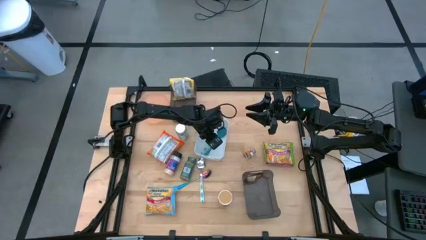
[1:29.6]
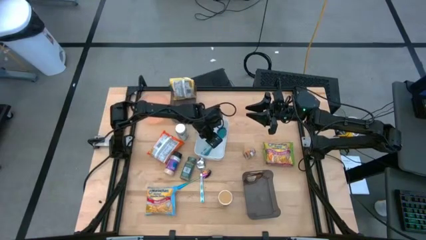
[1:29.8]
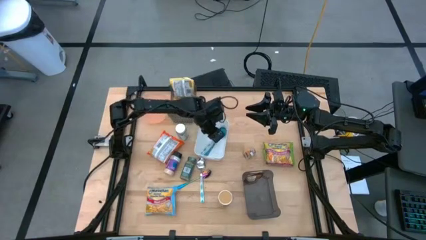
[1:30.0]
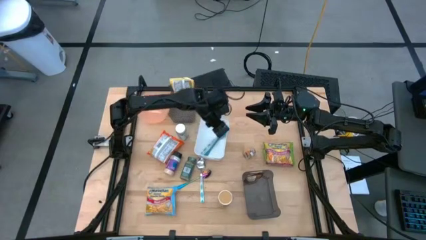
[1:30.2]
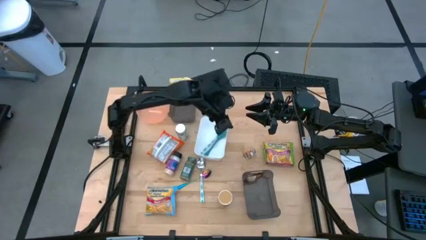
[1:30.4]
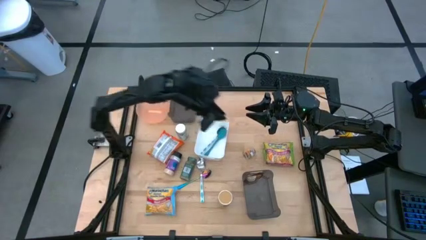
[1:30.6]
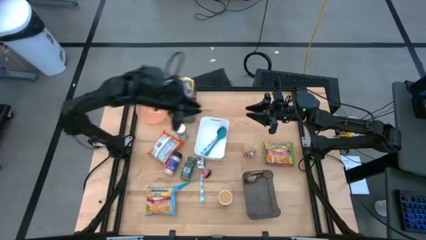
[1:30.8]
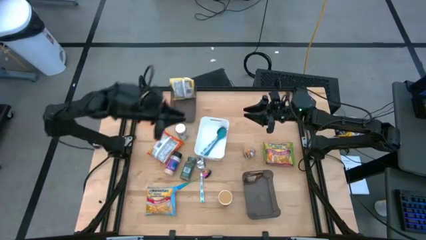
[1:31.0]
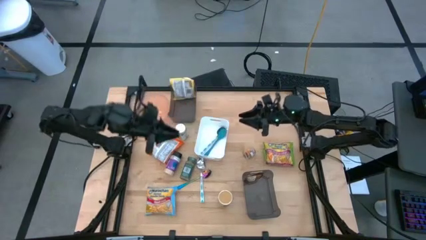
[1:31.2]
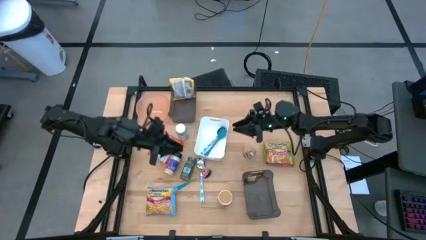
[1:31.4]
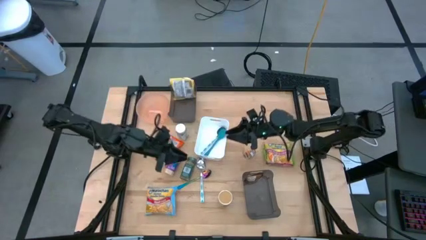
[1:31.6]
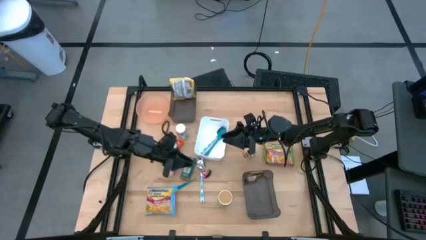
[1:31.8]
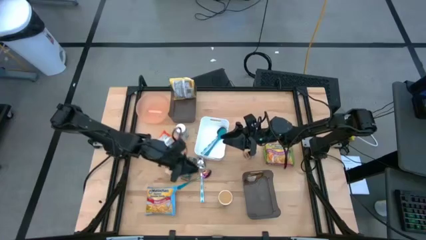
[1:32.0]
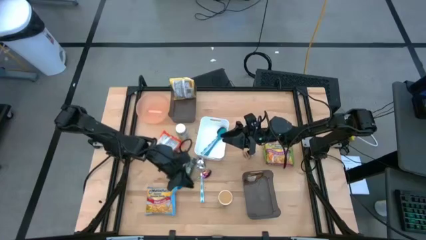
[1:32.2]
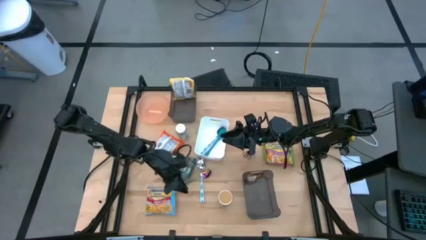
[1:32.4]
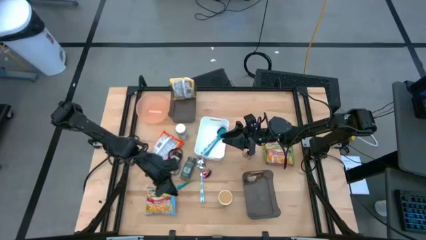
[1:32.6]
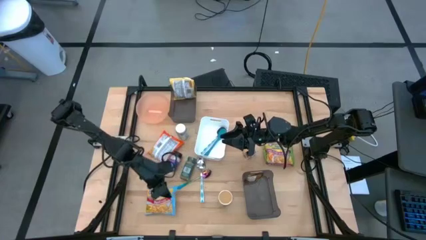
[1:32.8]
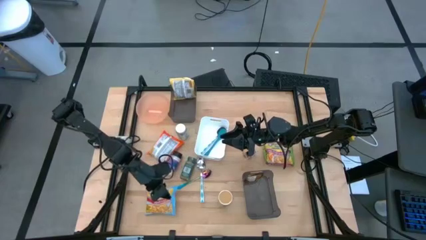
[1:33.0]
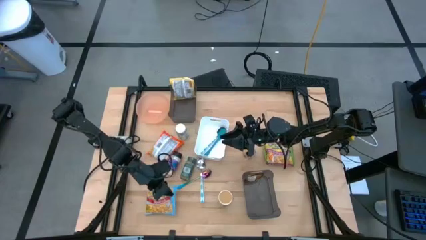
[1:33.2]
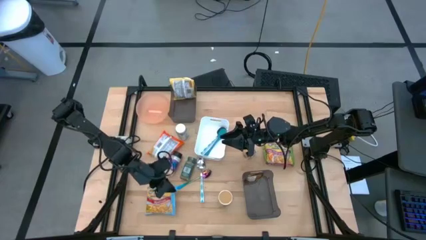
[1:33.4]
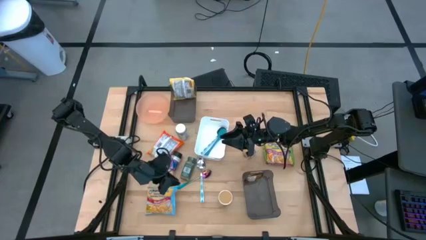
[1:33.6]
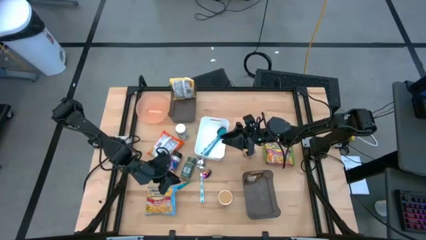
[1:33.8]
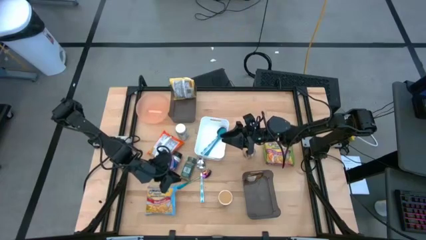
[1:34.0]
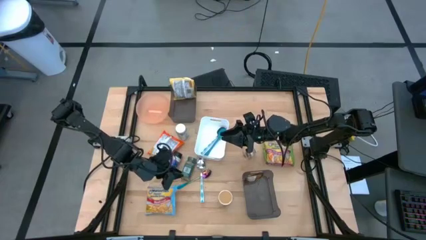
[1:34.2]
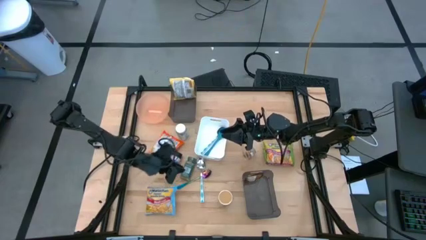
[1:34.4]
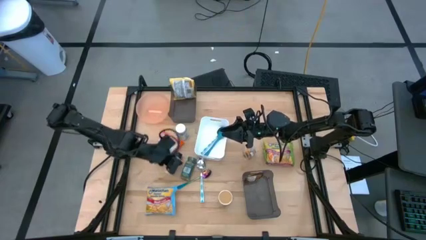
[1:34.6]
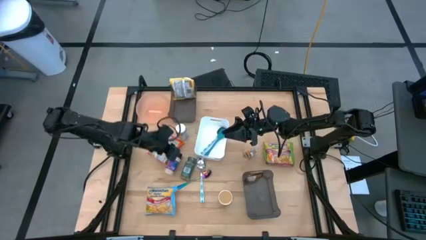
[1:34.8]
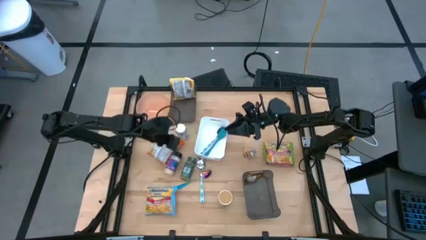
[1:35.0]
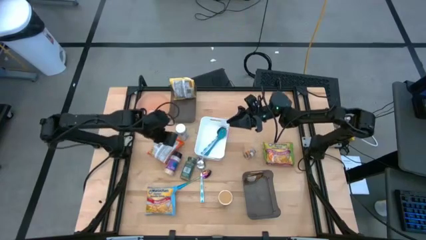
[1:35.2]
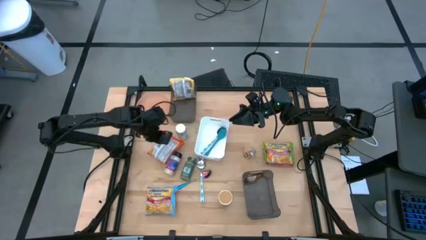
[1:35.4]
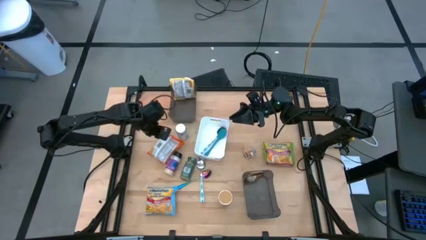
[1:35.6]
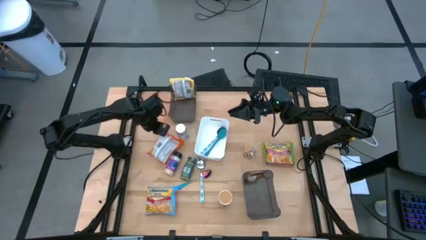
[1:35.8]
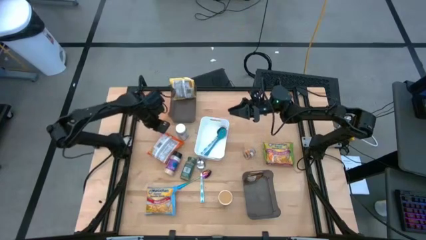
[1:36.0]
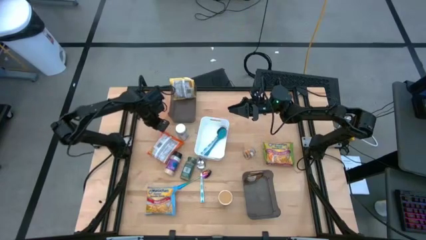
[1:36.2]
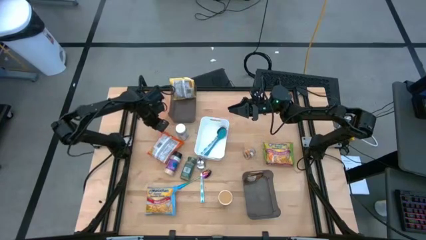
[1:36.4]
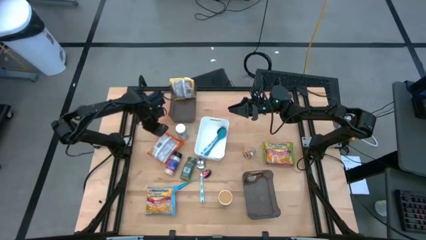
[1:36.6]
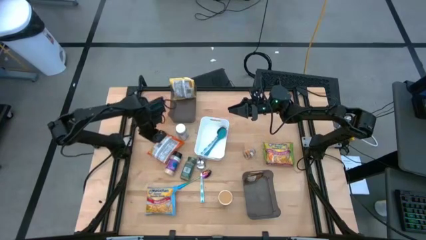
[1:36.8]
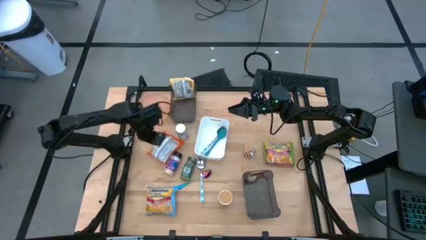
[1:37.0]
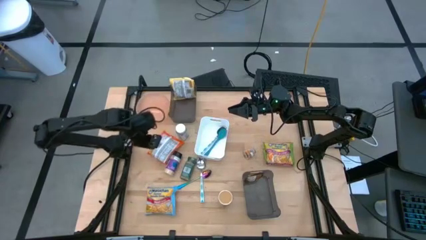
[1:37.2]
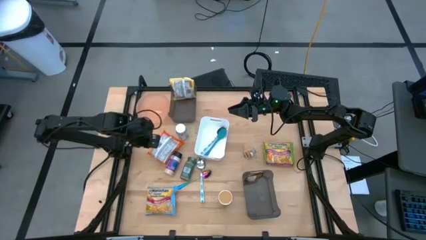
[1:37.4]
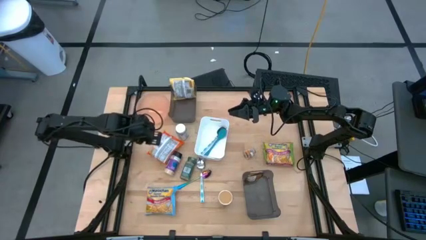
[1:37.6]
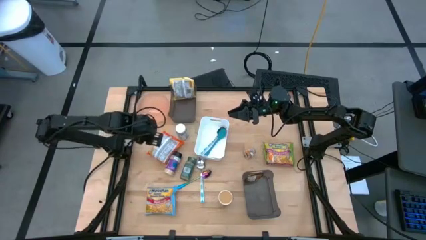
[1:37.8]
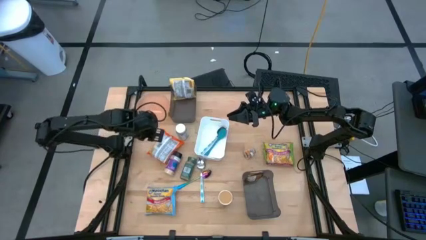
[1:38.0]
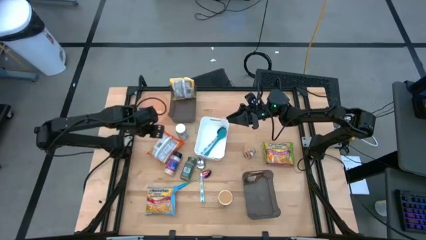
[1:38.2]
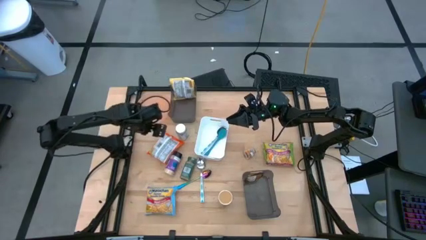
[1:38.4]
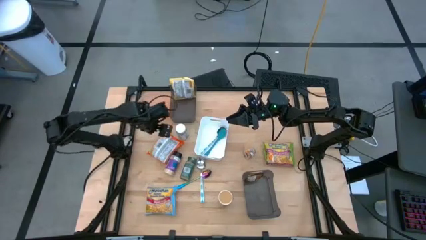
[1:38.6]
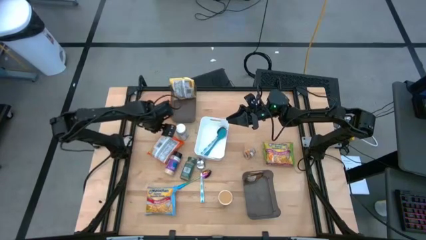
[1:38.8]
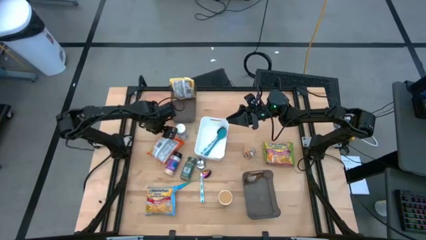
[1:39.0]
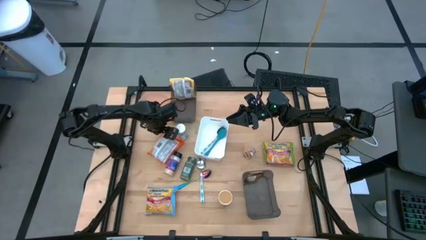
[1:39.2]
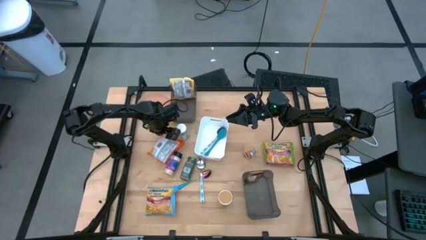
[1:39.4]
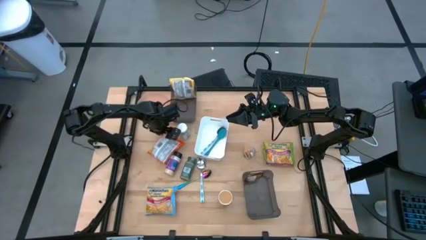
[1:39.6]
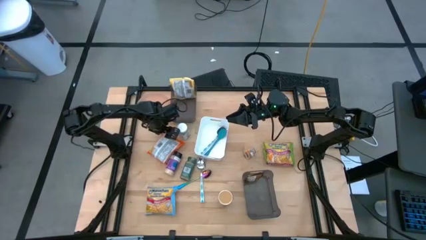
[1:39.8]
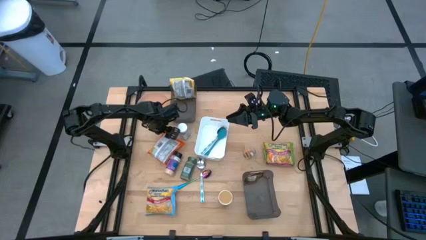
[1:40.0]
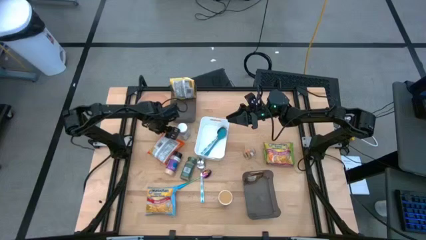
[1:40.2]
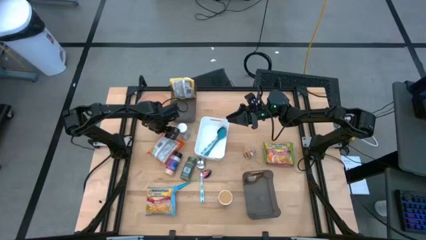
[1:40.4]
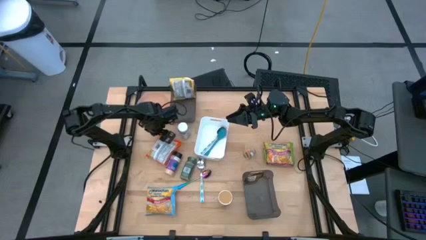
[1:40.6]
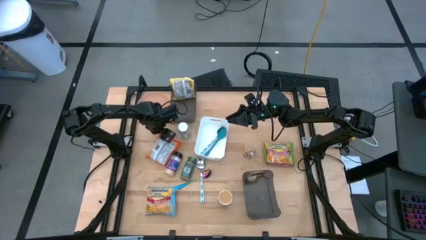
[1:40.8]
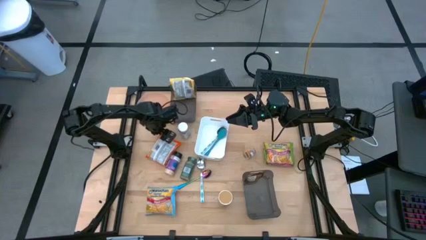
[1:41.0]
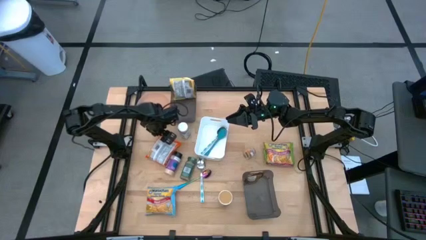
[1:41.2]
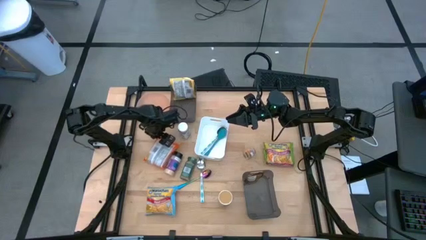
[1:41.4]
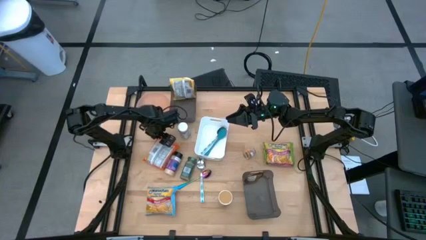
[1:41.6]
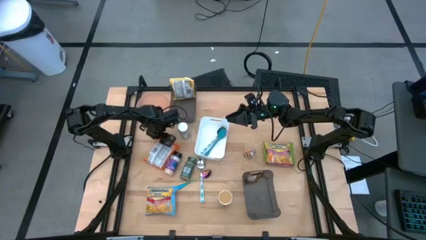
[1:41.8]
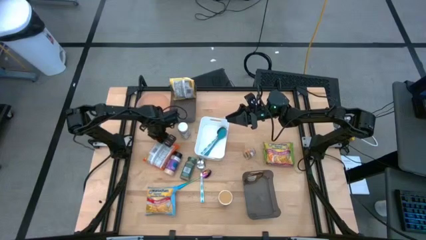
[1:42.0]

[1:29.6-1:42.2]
Task: Pick & Place Food Item
Put the orange noodle pack into the top black bin

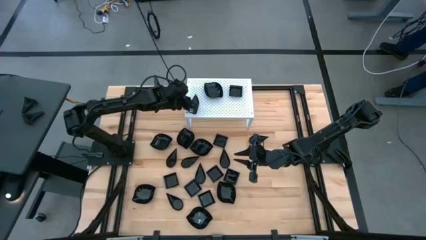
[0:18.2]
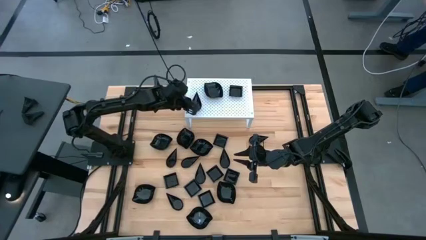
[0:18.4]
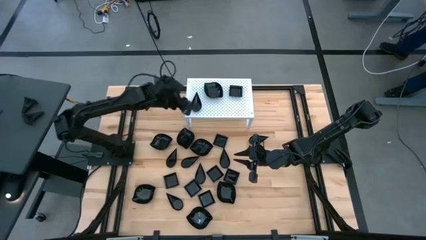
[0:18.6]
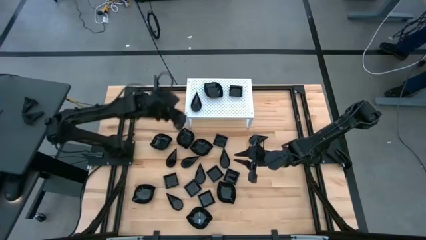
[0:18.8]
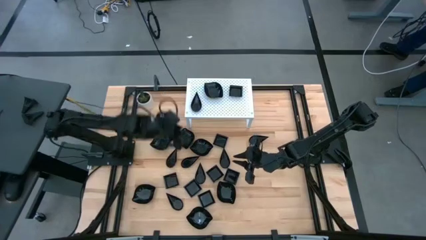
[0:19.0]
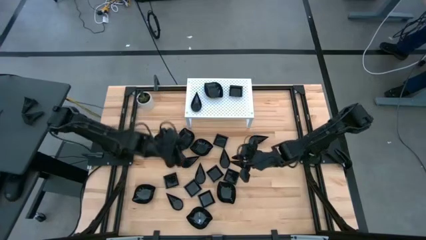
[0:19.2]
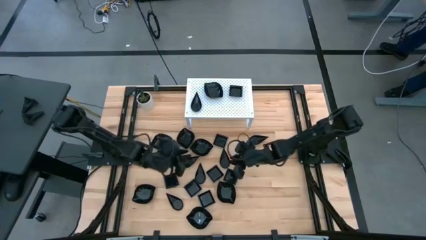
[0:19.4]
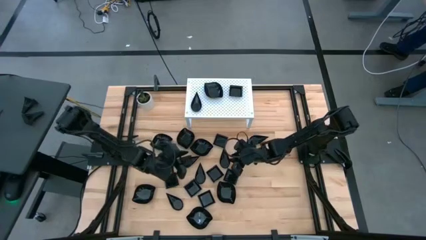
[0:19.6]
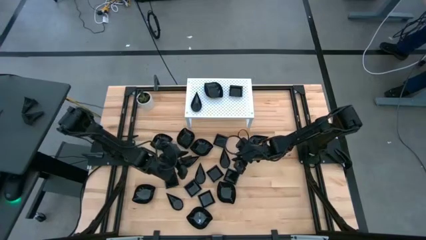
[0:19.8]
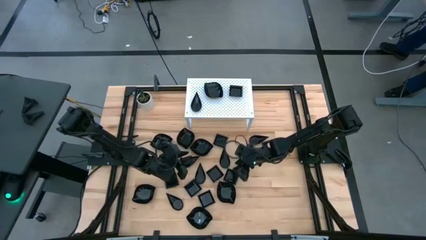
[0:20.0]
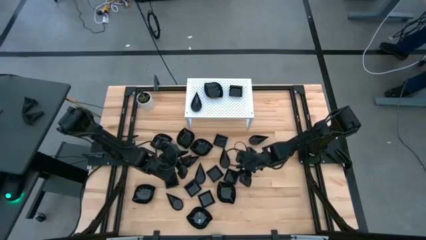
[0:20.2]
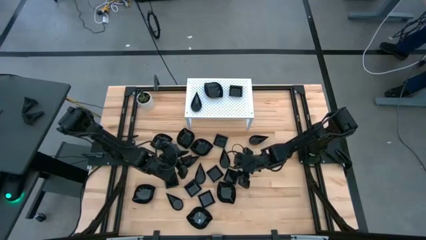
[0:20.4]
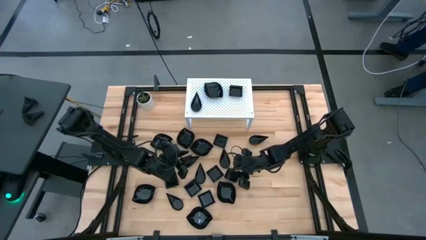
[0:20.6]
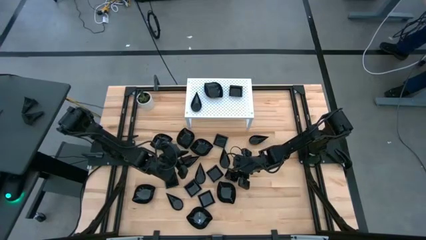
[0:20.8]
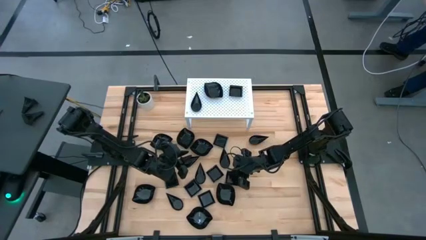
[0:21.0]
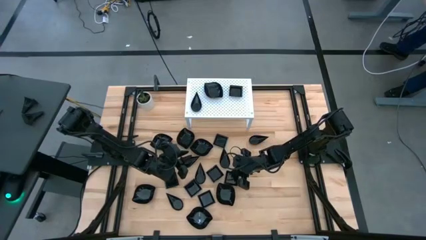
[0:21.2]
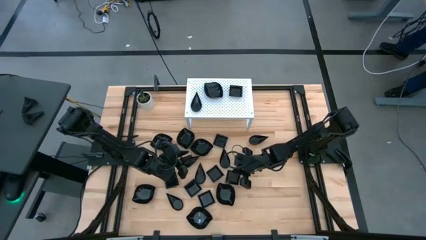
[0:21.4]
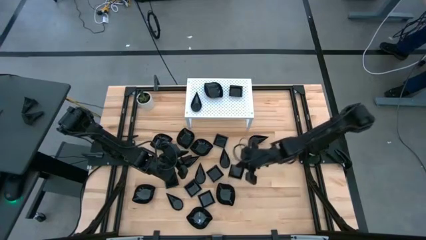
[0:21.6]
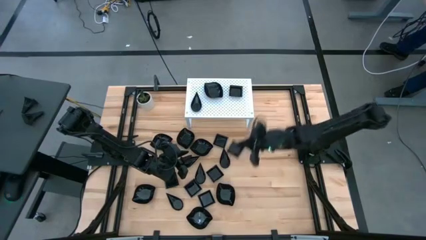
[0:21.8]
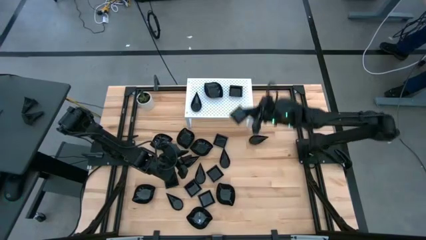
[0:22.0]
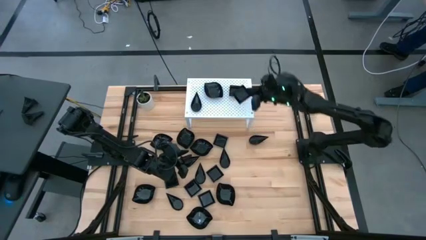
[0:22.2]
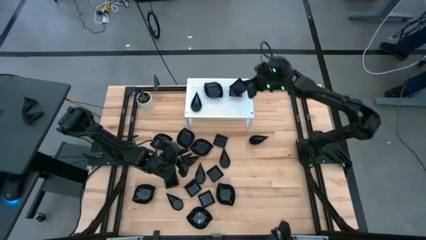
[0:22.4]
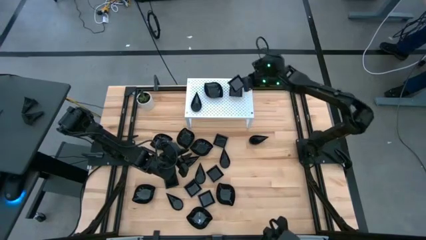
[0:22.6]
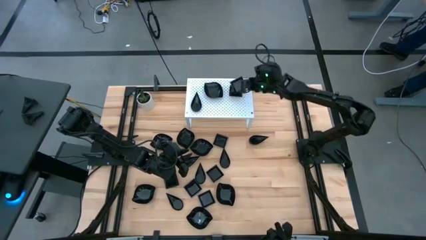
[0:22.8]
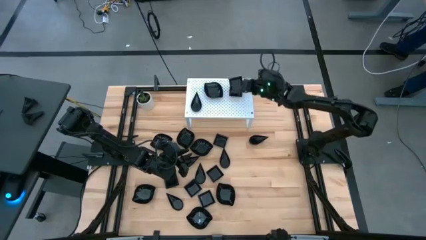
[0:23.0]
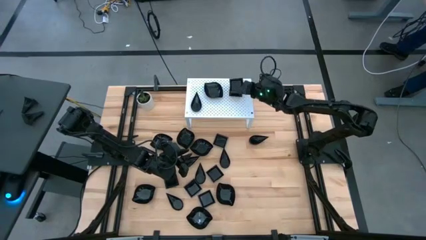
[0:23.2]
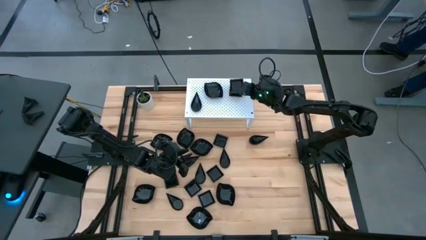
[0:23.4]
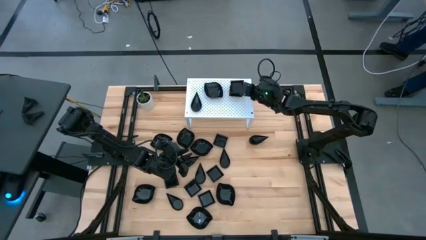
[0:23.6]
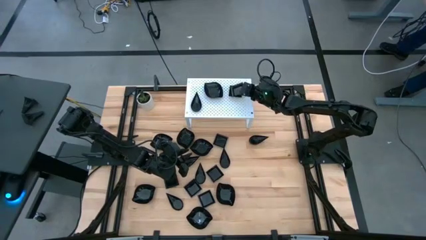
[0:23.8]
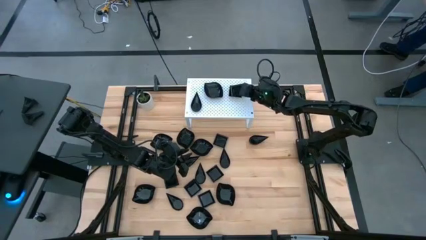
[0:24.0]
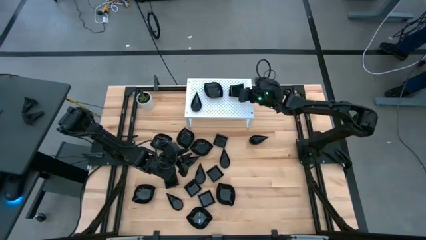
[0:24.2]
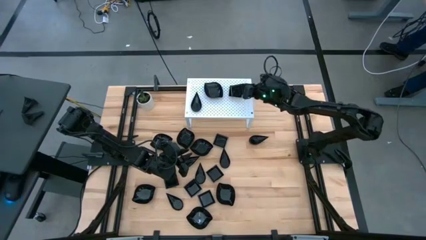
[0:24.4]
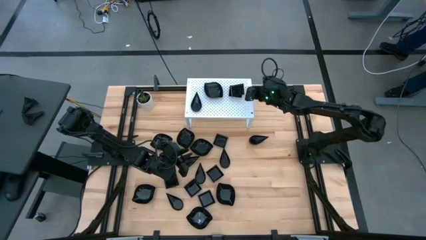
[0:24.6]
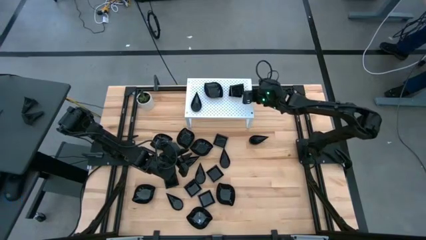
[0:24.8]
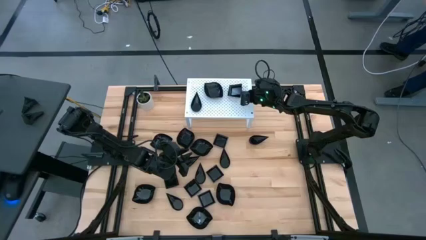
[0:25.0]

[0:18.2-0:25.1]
Task: Pick & Place Mini shaped plates
Stack the black square plate on top of the other black square plate on the shelf
